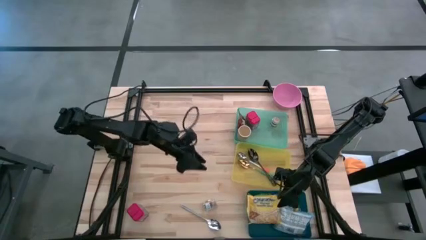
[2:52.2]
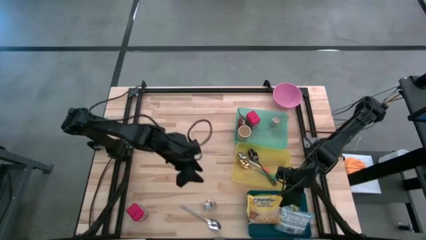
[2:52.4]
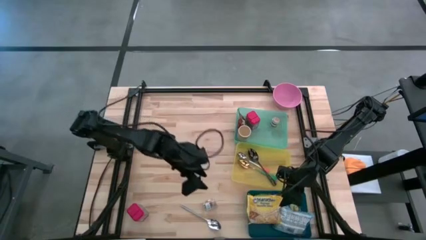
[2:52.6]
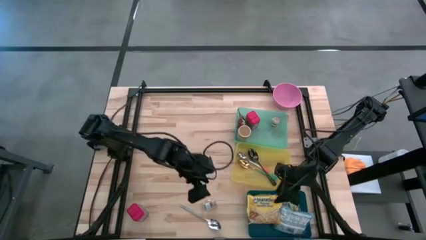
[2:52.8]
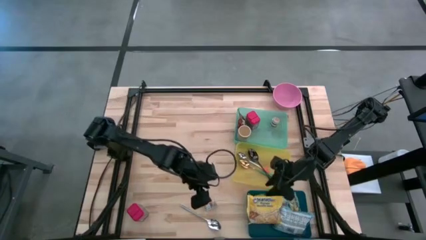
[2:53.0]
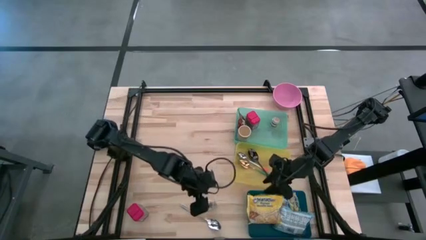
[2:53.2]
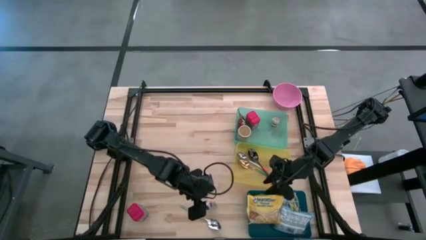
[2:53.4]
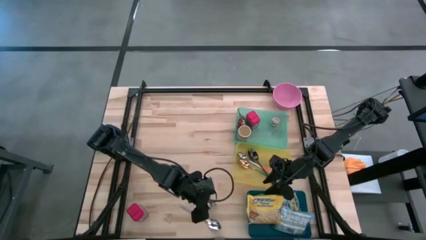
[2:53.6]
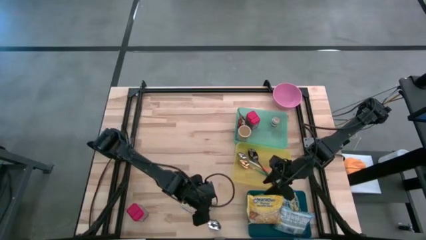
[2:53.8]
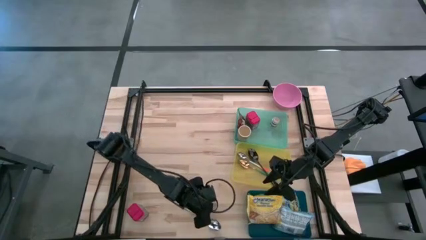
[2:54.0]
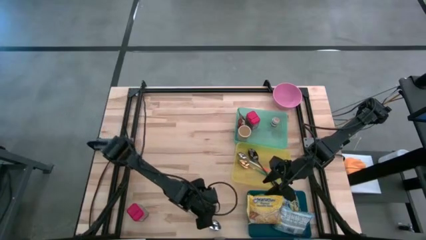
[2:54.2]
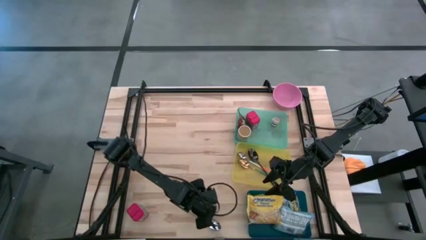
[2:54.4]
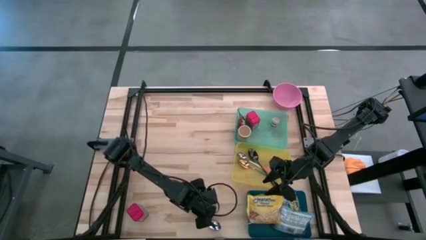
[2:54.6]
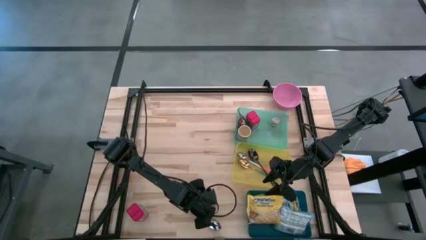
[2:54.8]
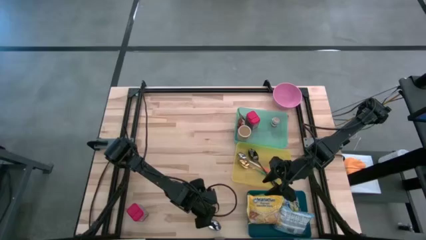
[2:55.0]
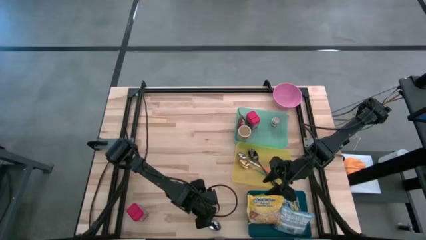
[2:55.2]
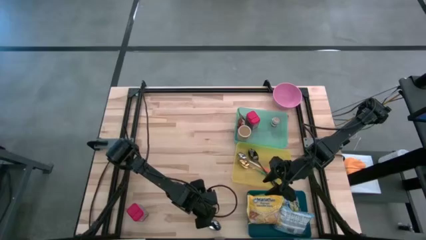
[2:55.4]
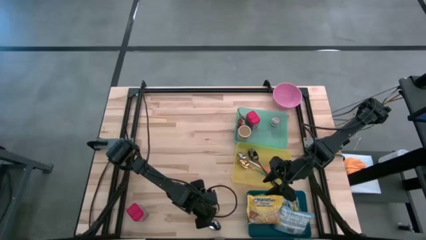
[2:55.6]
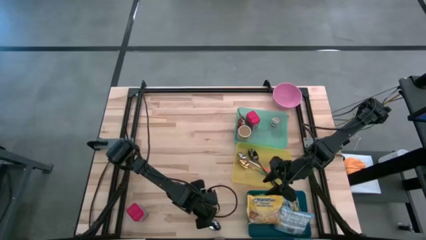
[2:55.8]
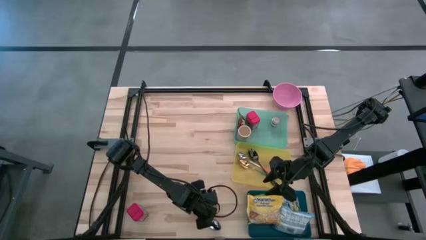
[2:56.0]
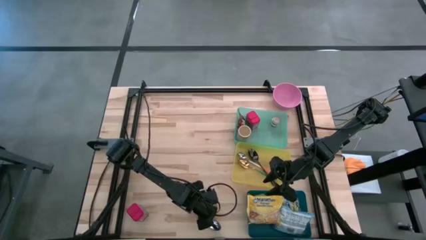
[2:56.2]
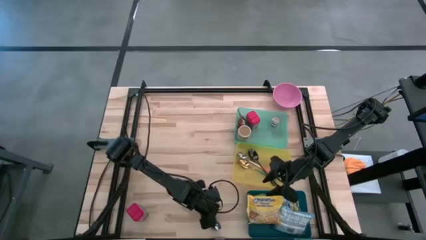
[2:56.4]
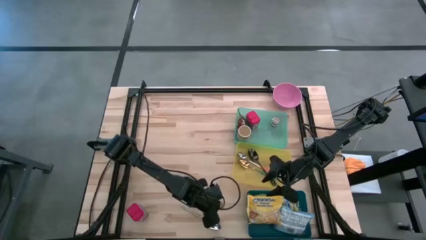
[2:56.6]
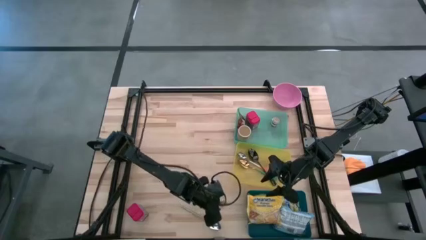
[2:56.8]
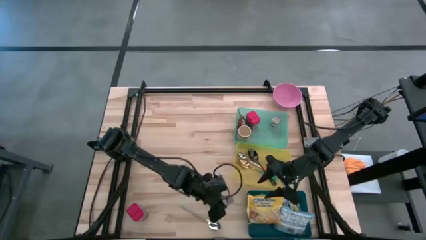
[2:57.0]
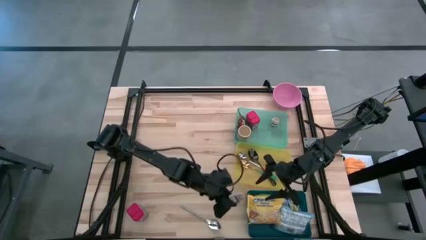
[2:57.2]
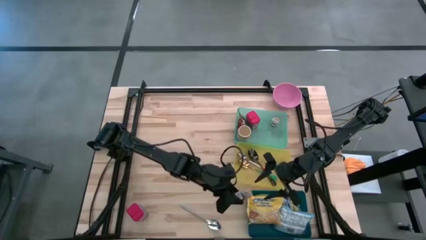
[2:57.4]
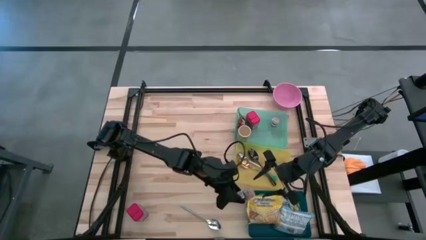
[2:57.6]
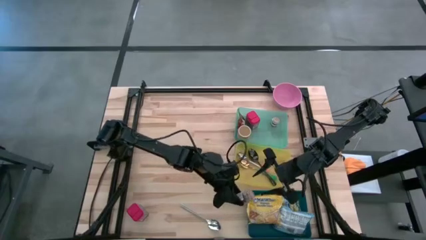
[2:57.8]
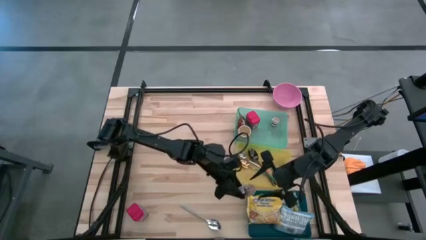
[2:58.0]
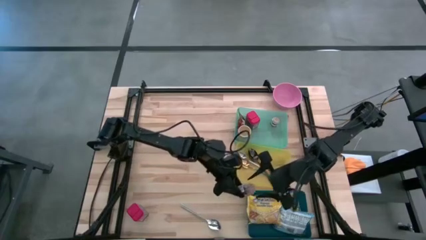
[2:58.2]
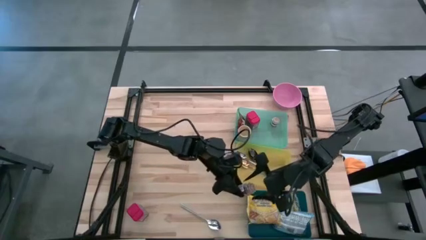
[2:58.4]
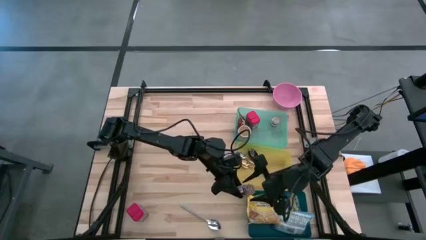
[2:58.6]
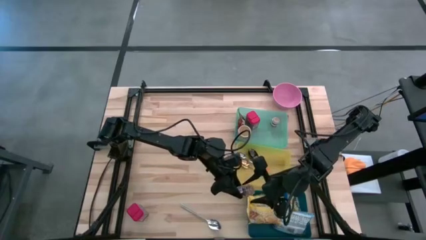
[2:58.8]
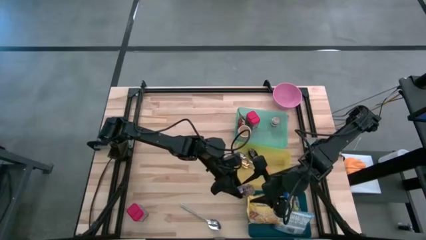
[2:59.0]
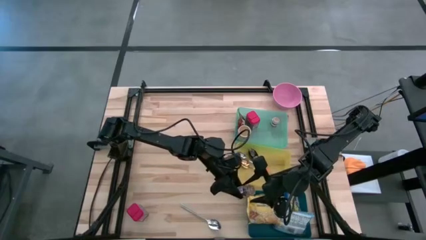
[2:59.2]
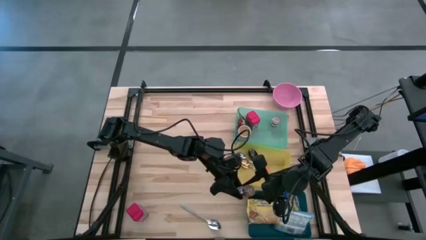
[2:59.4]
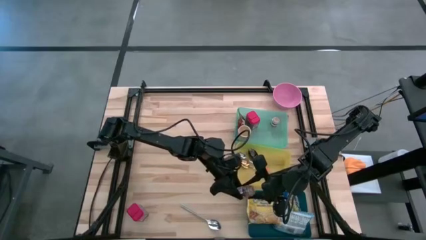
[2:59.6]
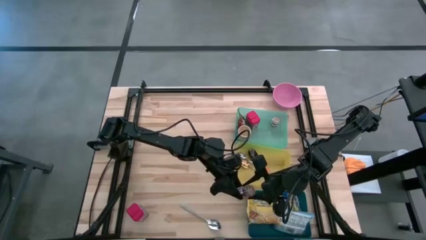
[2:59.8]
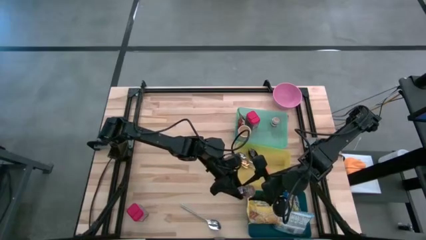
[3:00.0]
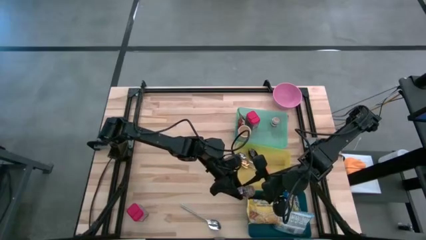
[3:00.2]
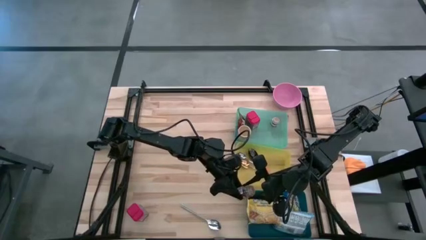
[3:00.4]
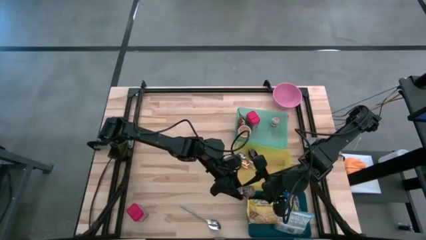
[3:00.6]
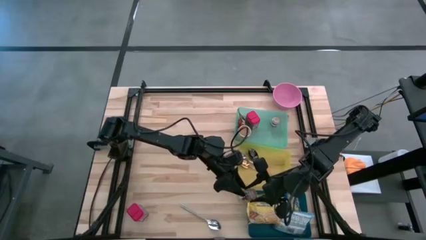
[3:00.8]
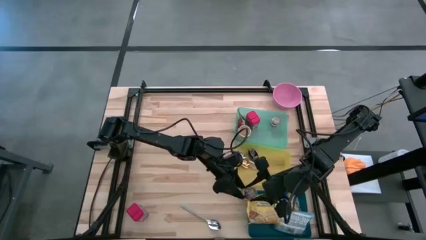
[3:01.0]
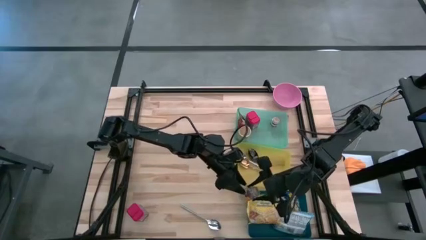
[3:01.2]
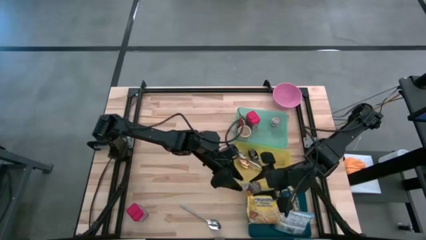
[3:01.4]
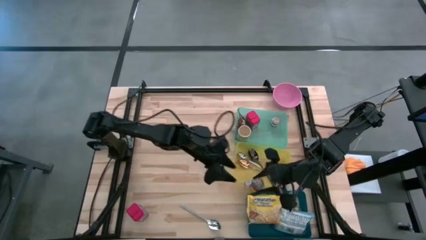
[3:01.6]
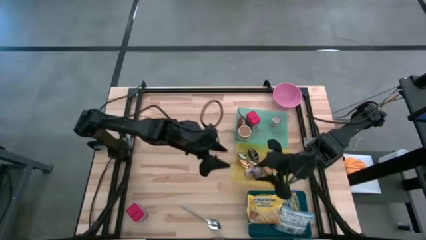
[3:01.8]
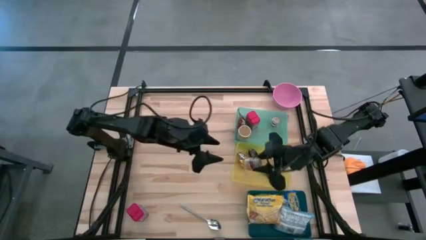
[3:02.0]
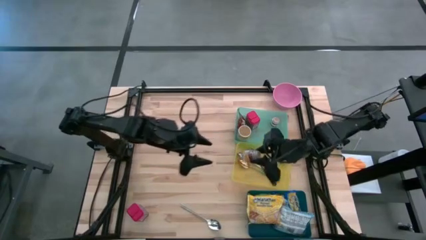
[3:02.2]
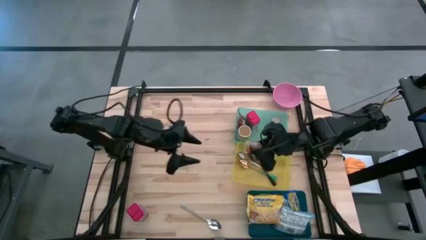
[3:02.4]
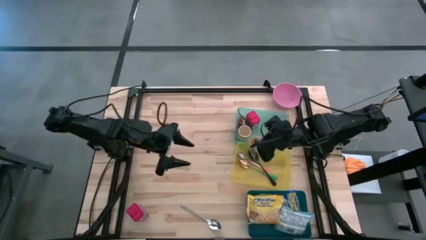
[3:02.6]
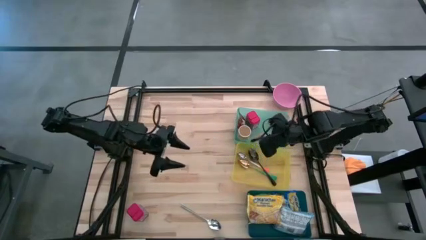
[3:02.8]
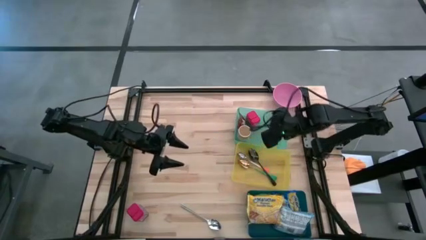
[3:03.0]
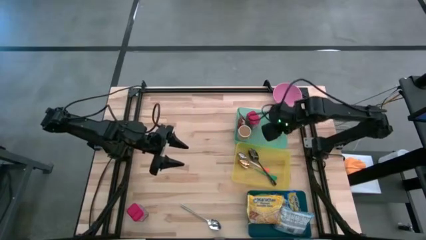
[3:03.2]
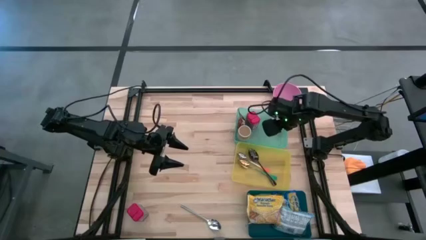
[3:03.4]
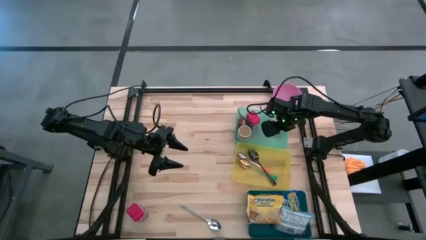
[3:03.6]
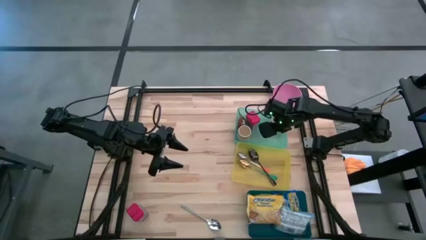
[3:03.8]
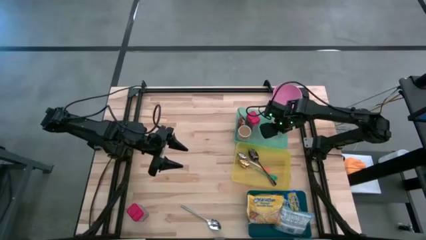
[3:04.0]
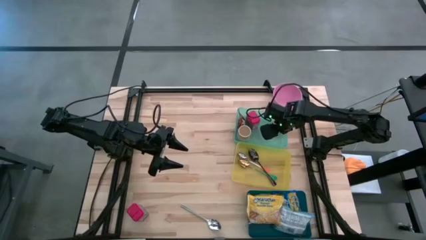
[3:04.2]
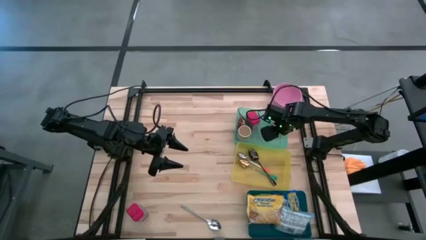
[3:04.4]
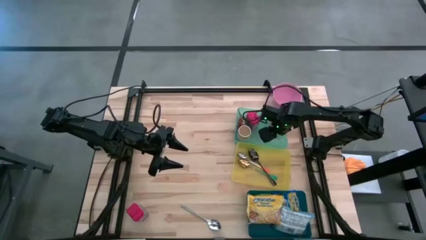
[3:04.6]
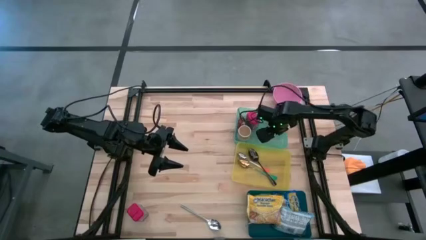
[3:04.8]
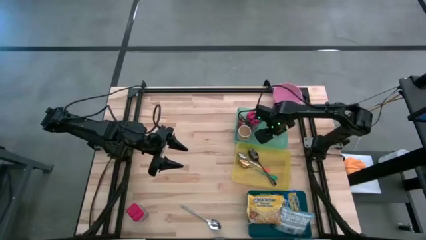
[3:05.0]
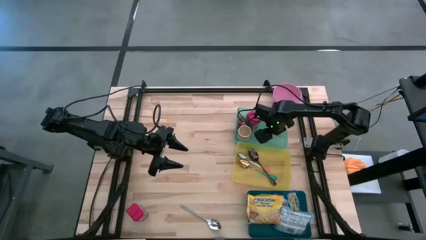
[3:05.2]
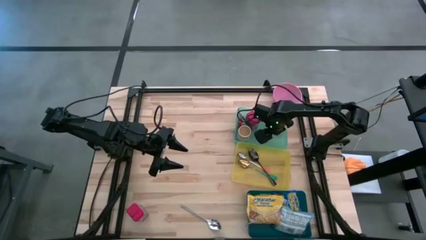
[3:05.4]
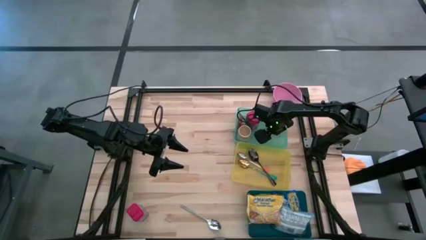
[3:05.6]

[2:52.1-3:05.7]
Put the brown seasoning bottle into the green bin
